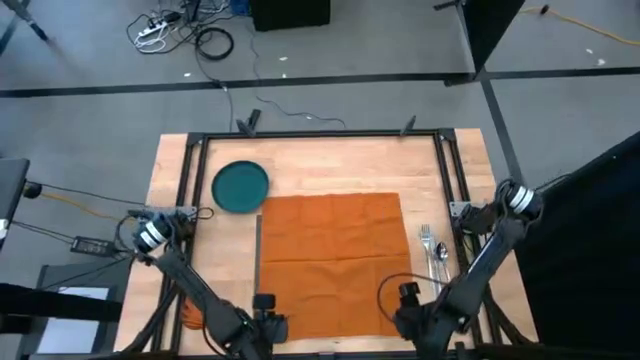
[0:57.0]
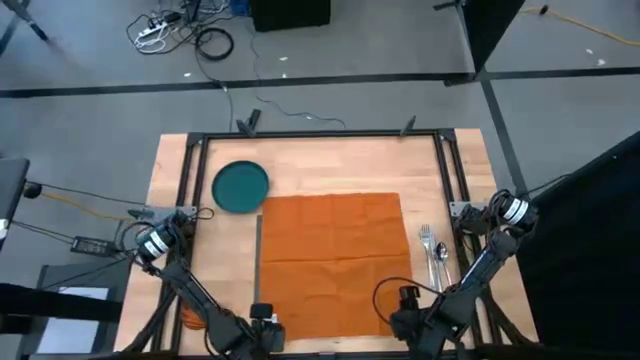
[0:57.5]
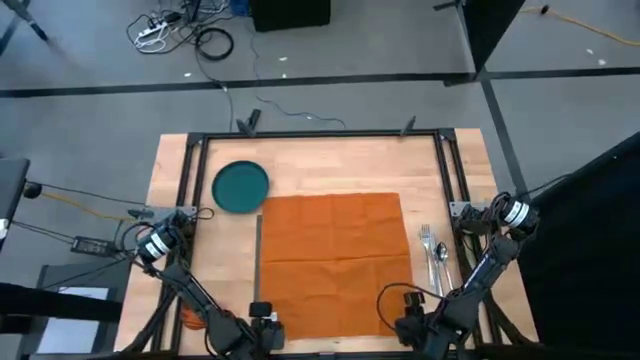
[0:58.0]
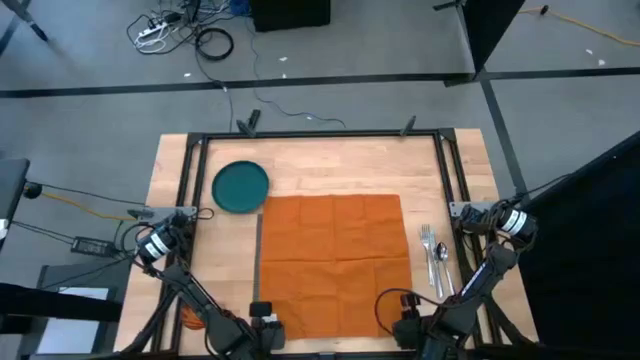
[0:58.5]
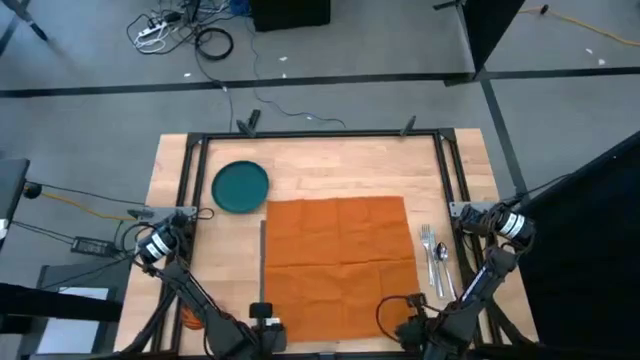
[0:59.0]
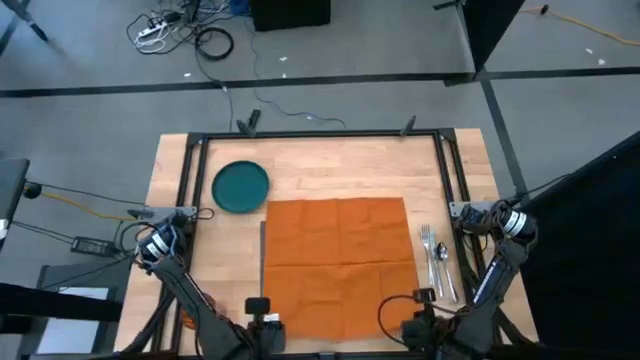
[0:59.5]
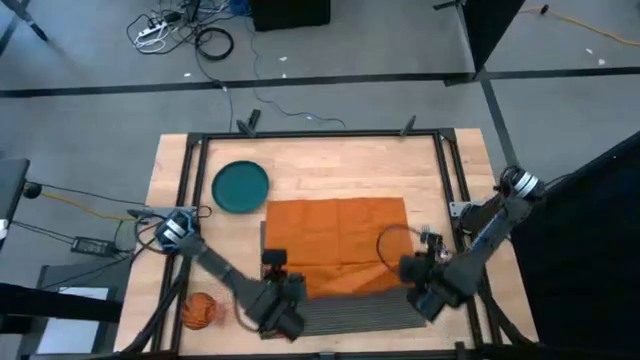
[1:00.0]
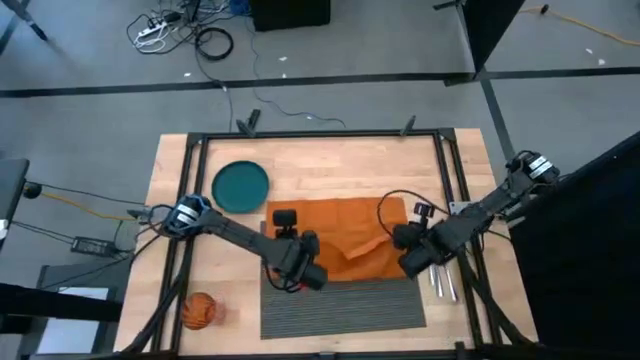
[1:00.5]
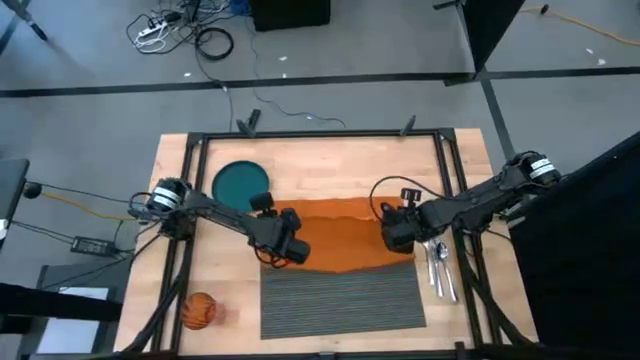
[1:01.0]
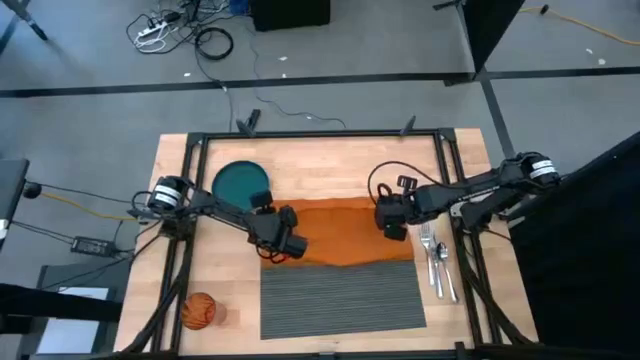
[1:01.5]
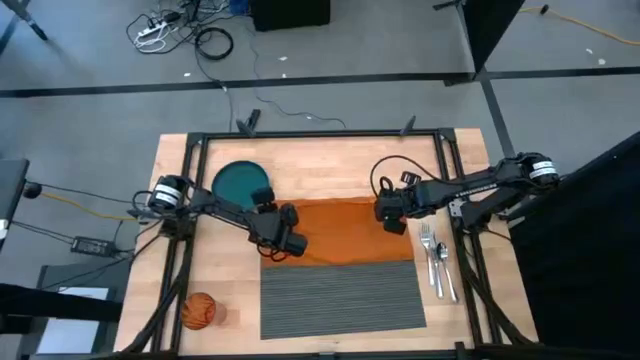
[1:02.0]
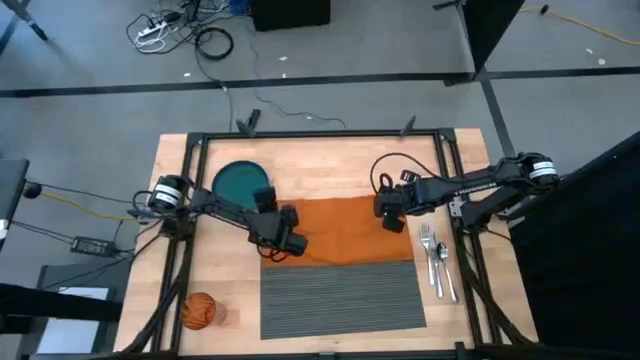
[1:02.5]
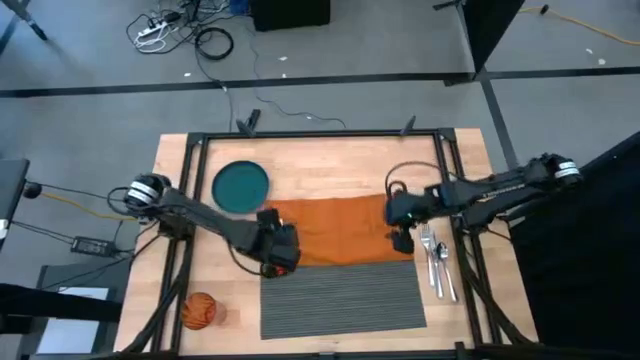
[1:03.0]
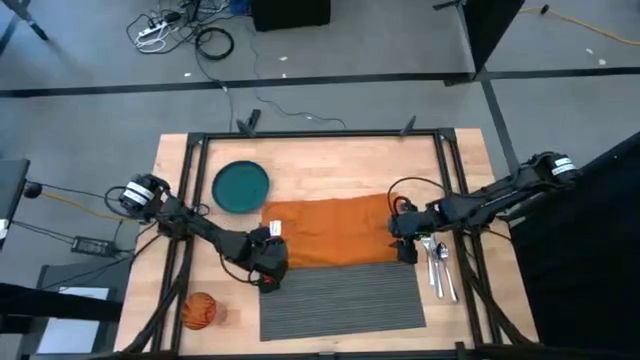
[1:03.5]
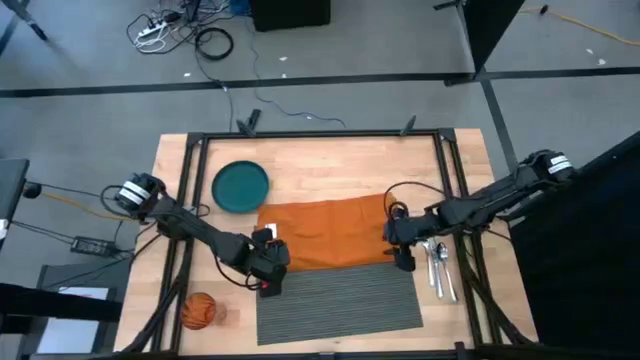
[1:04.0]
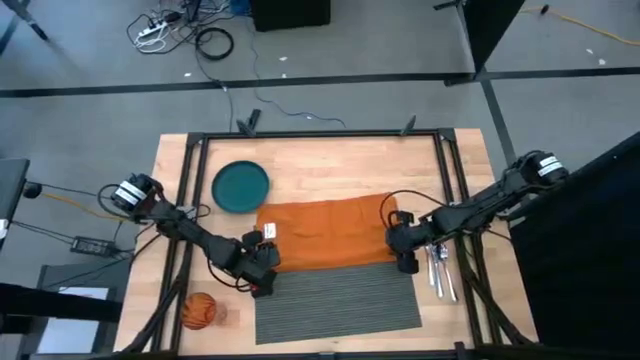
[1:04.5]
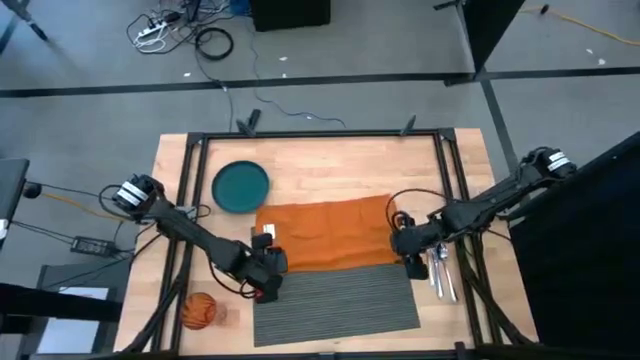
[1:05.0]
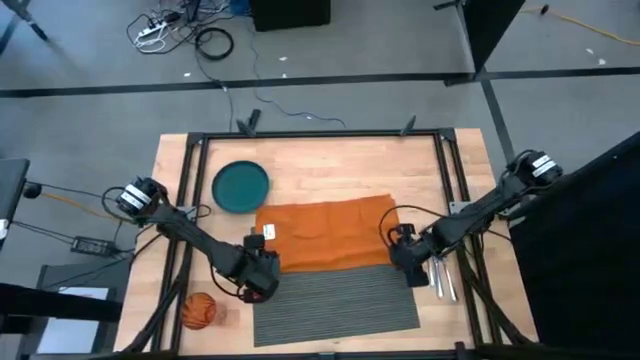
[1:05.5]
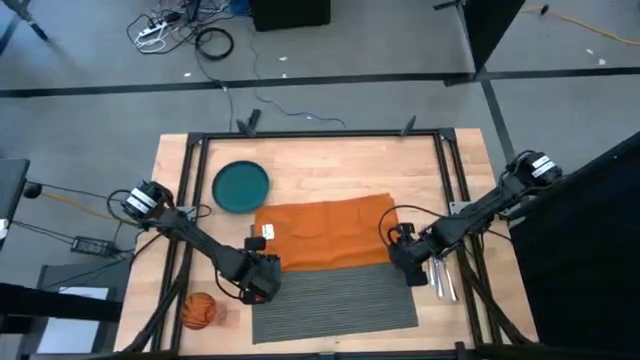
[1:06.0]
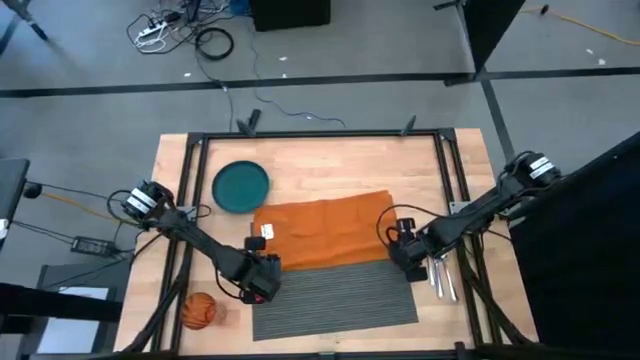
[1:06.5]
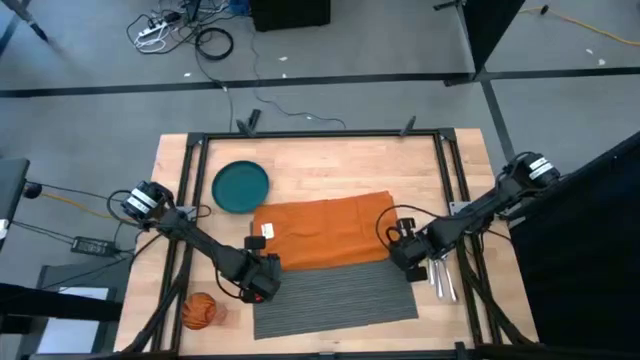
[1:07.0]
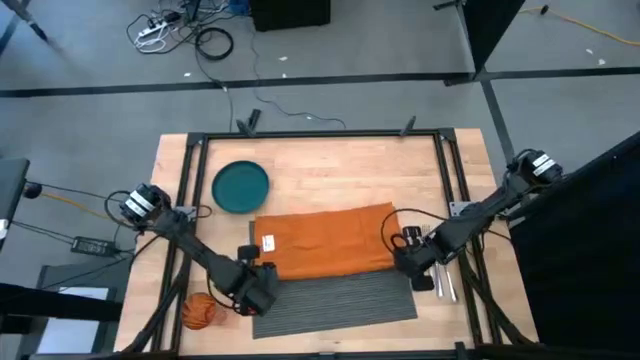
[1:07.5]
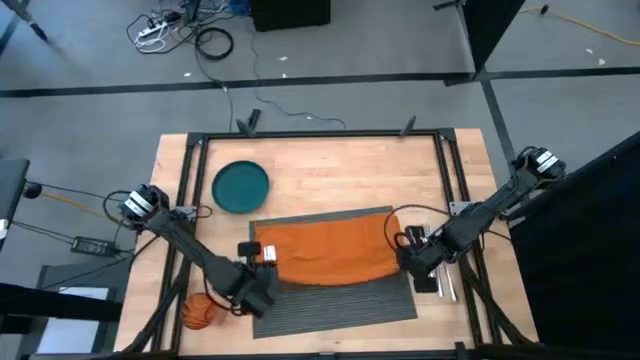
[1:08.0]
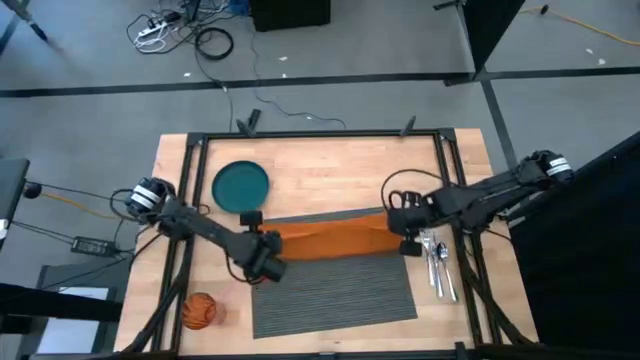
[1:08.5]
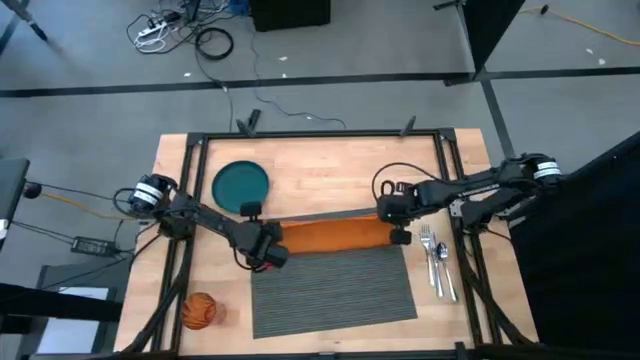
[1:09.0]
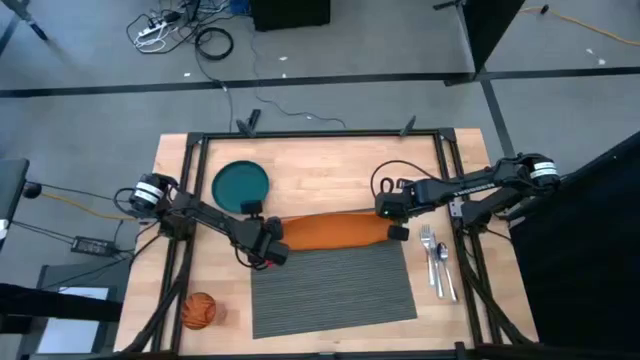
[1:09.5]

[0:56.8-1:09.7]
Task: Set table place
Fold the orange table napkin

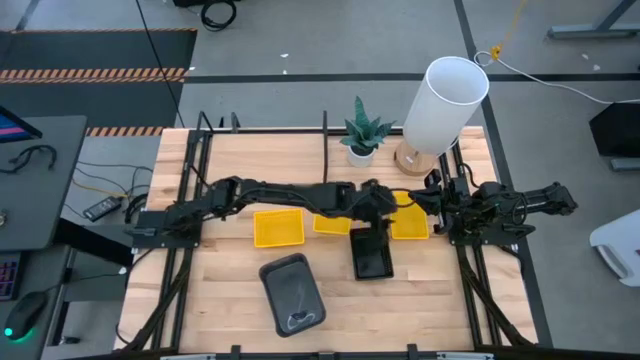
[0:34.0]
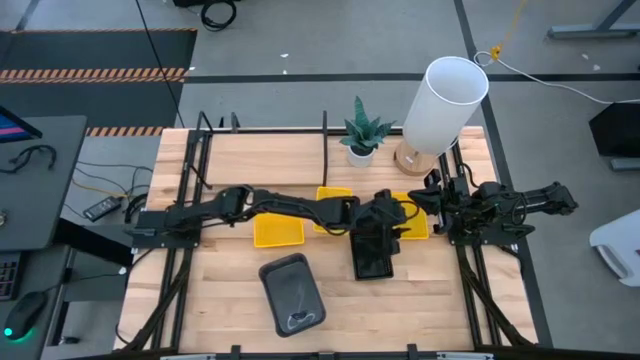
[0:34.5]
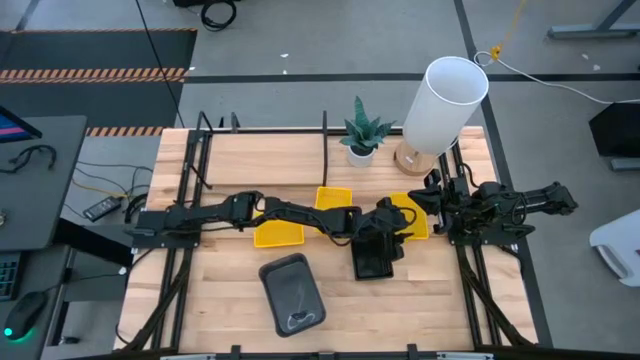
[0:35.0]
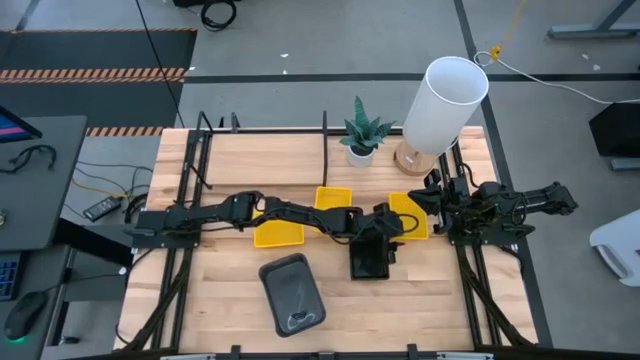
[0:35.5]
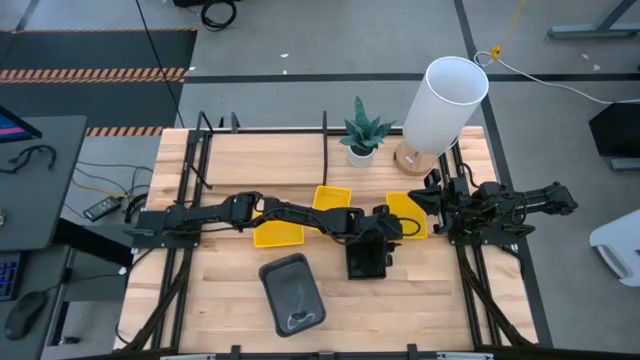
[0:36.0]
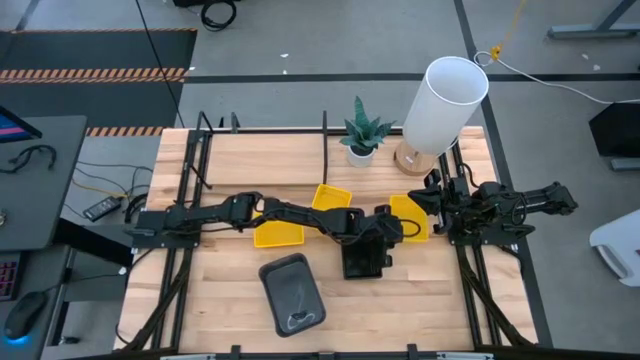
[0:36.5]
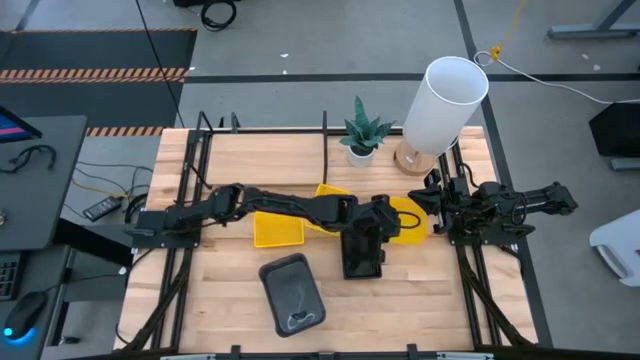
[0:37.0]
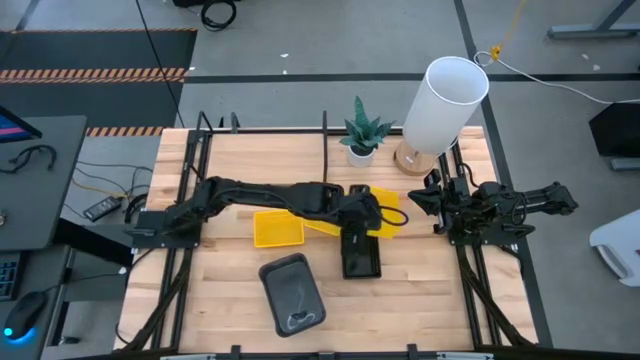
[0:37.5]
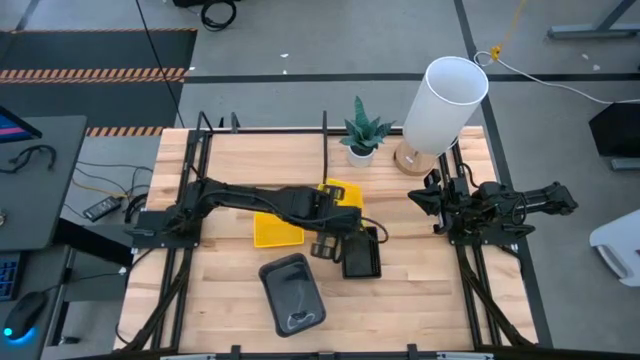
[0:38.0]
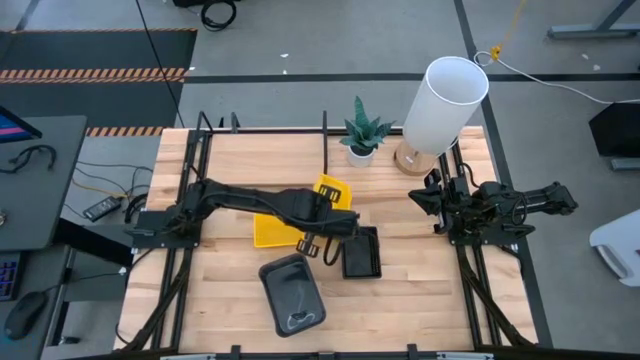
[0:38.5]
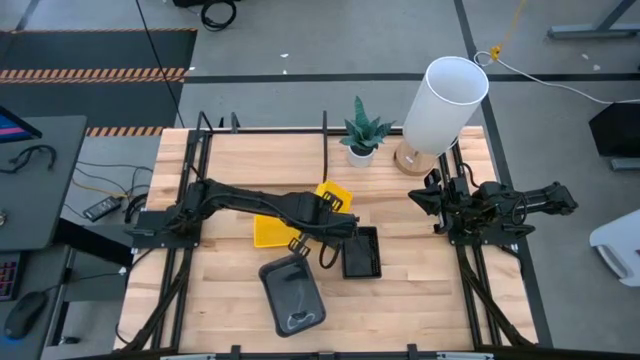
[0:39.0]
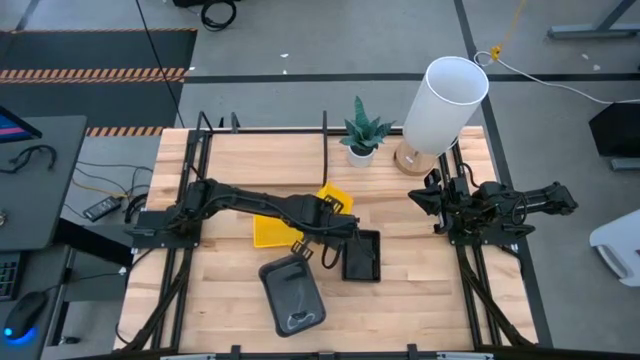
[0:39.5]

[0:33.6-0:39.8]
Task: Stack baskets on shelf by color
Stack the right yellow bin on the middle yellow bin

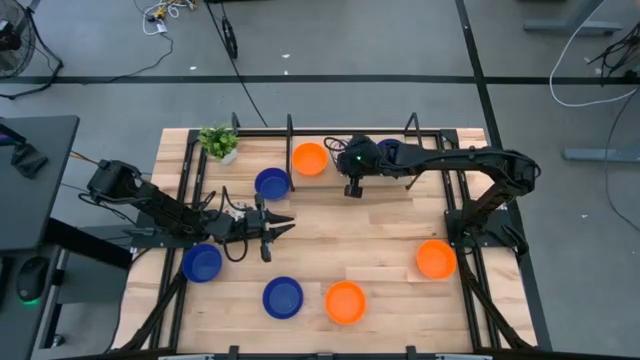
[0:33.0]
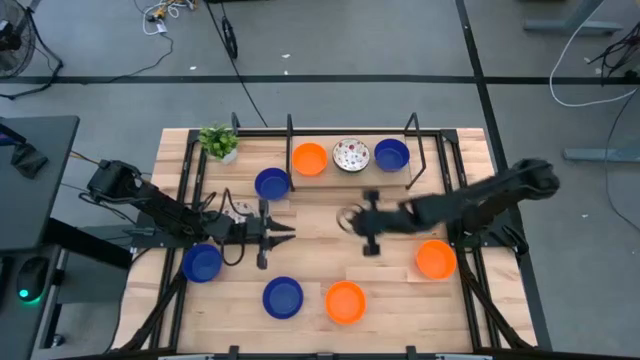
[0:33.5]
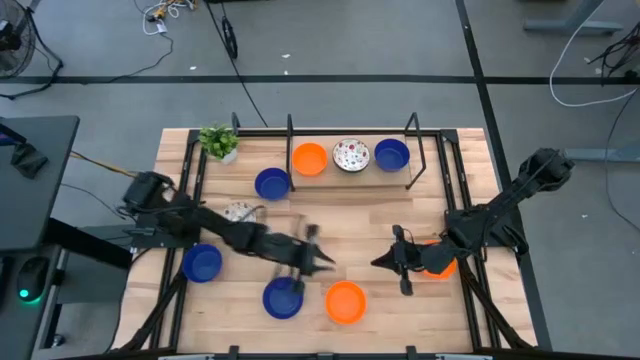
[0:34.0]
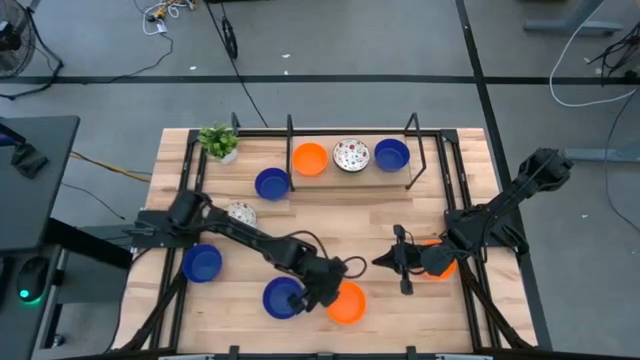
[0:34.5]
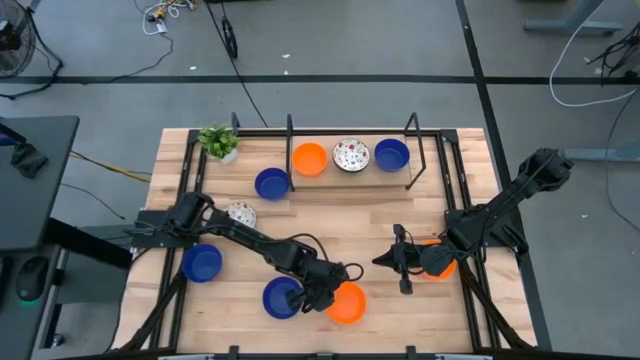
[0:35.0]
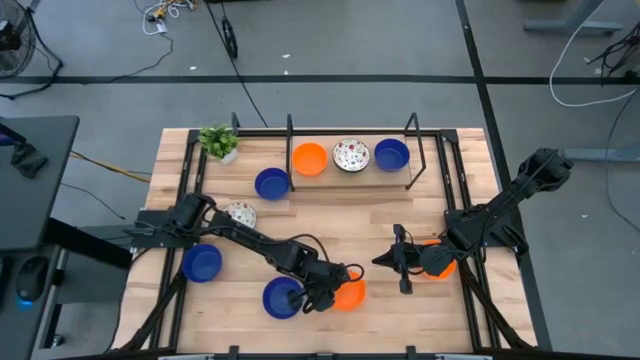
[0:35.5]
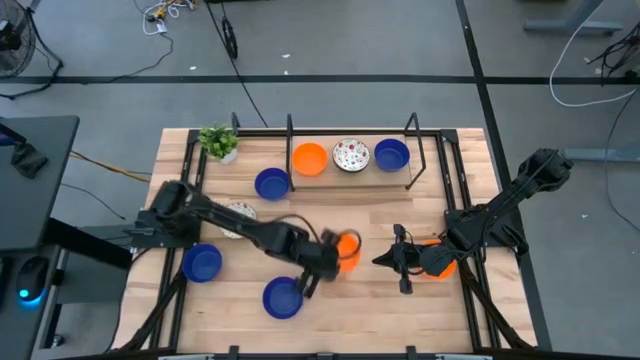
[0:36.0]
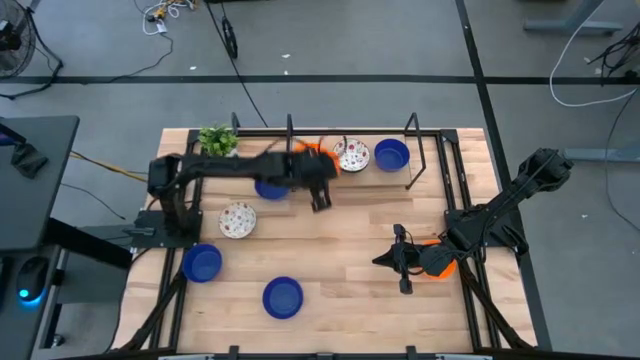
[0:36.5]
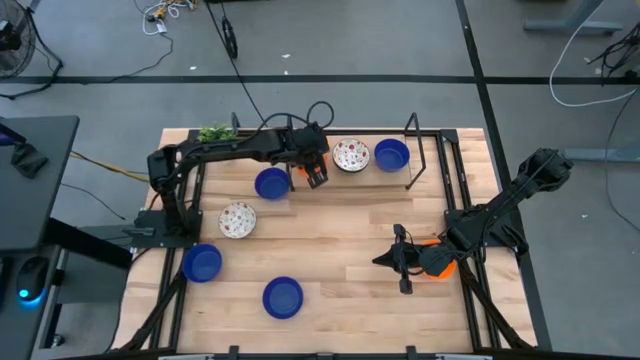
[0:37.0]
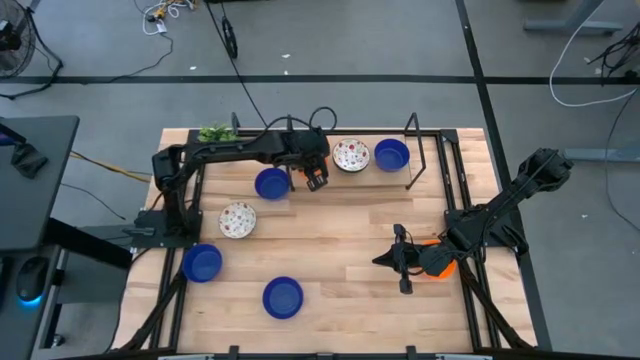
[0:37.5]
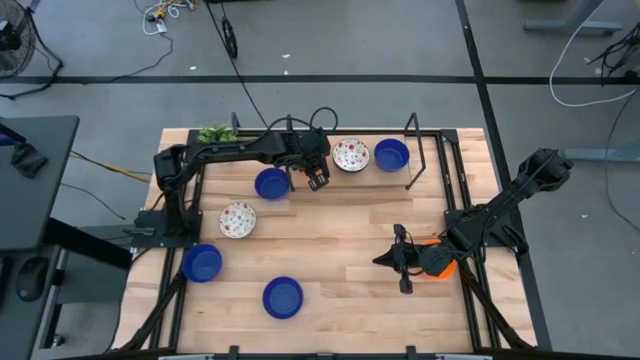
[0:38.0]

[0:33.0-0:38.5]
Task: Pick & Place Mini bowls
Stack the orange bowl on top of the orange bowl on the shelf
